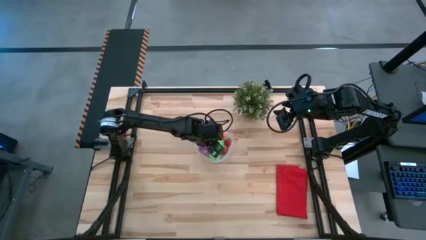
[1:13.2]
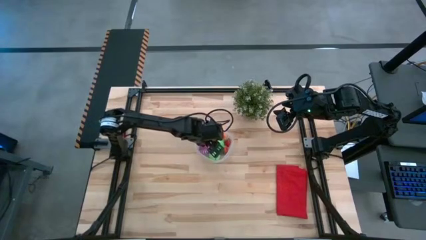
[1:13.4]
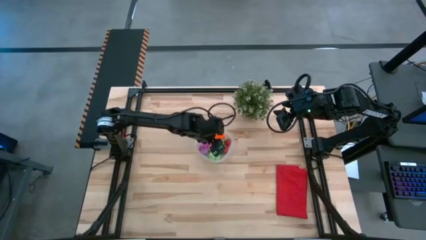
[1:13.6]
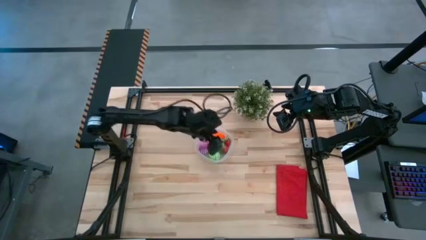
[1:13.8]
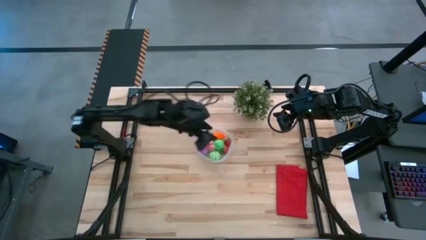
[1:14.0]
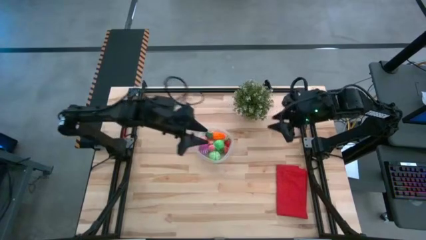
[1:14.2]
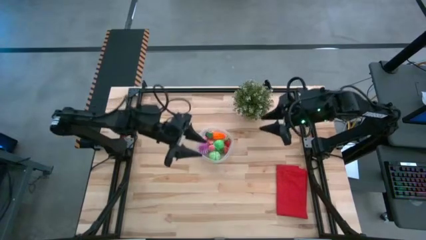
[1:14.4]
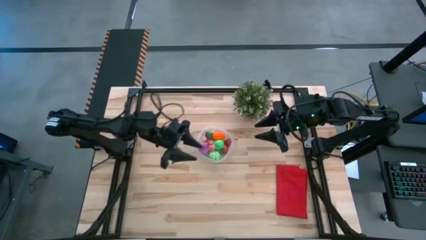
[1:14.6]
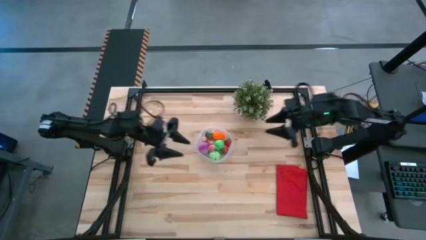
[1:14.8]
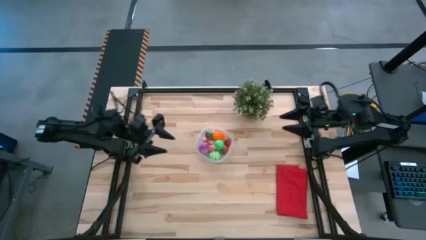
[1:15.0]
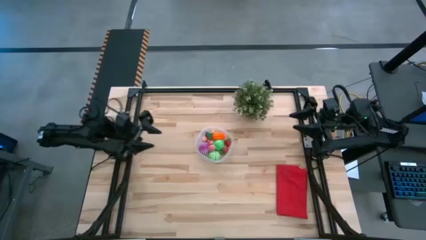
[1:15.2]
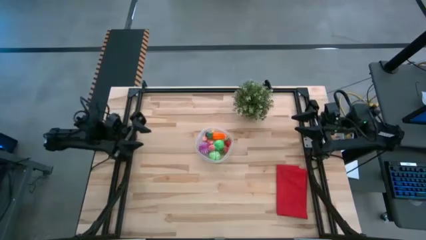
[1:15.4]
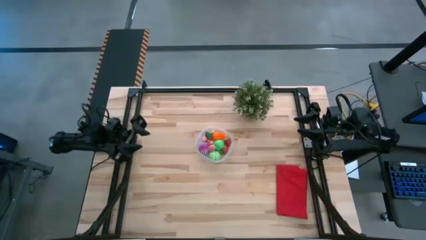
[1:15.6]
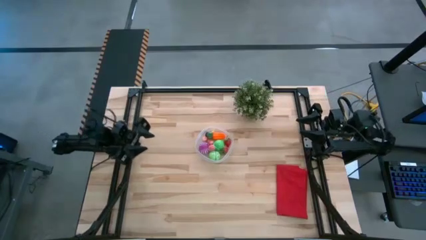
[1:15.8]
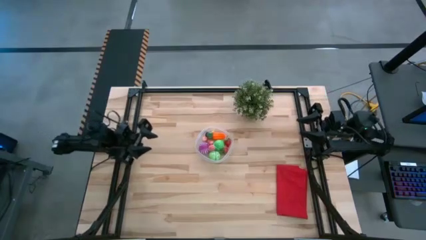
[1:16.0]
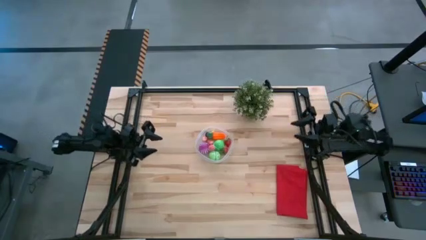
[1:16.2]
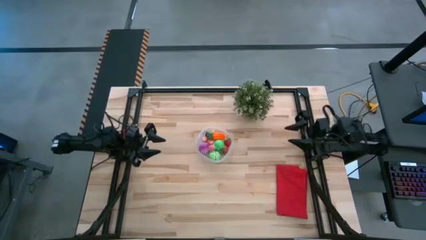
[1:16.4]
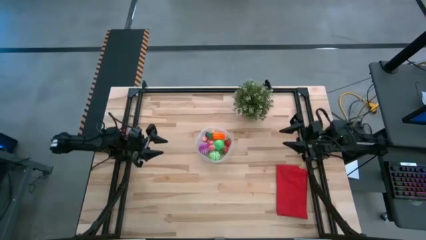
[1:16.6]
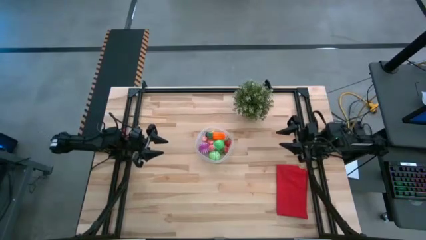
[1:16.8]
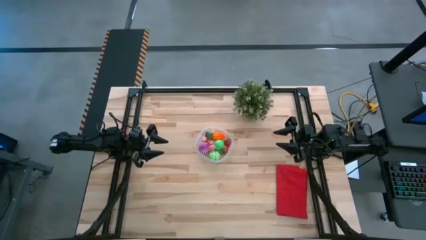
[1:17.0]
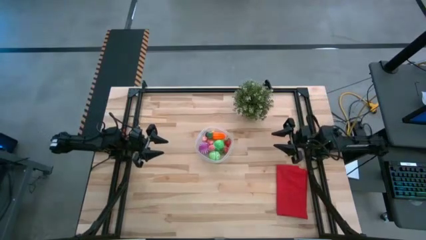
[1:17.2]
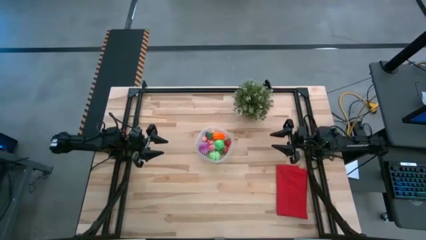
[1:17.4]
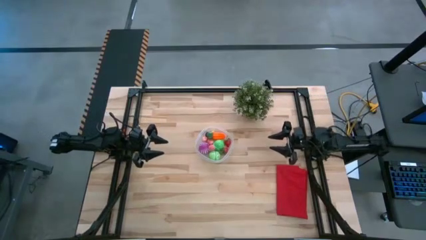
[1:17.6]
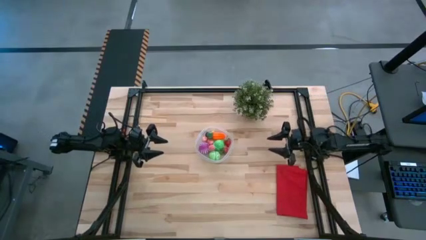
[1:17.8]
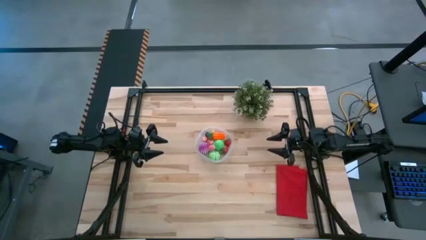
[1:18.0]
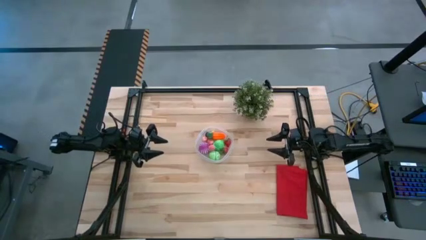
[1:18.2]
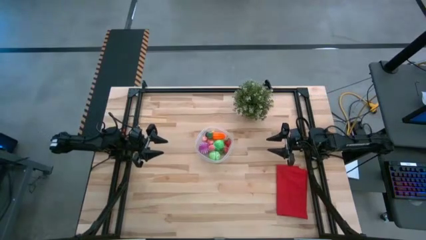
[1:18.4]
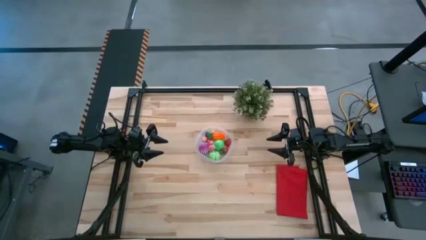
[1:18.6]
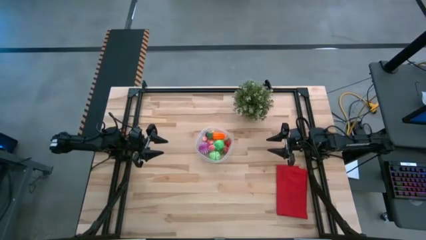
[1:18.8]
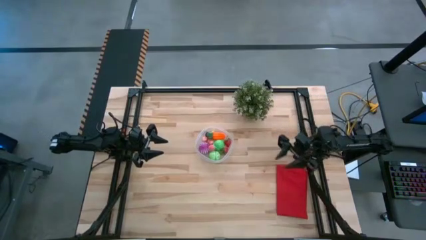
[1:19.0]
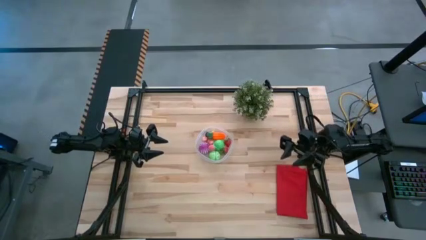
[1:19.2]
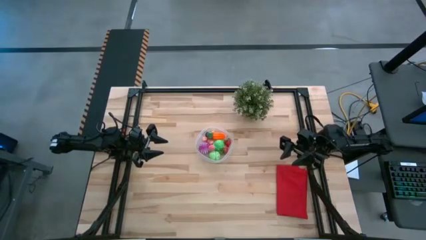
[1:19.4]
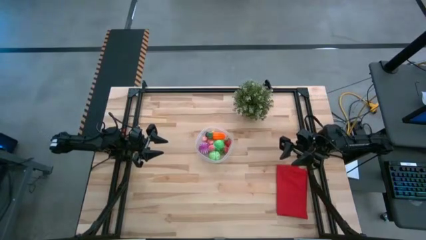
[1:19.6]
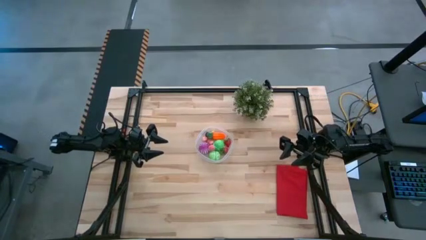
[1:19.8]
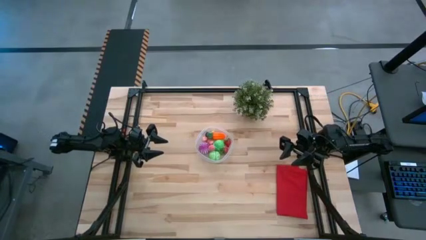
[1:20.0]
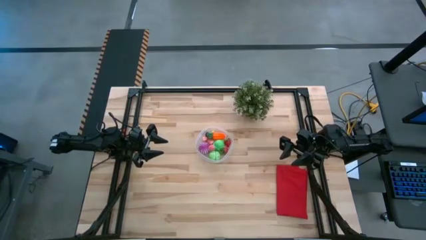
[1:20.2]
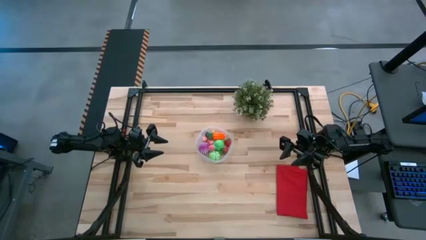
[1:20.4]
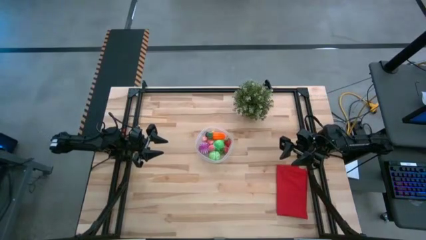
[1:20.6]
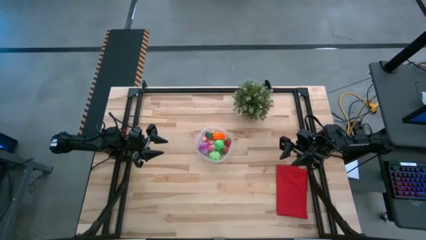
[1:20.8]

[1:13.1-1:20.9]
Task: Pick and placing Produce into tupperware
Return to Home Position

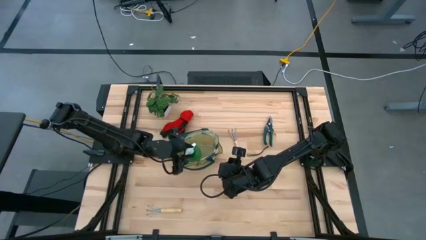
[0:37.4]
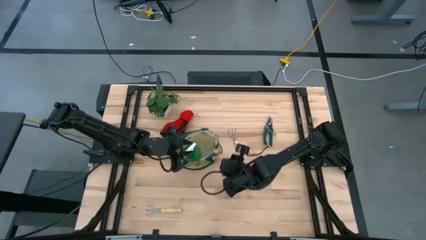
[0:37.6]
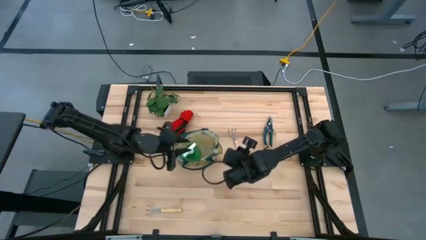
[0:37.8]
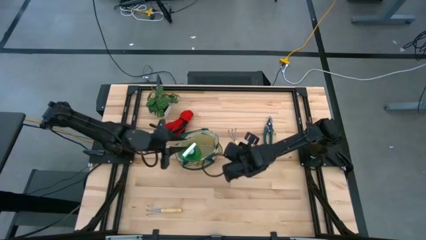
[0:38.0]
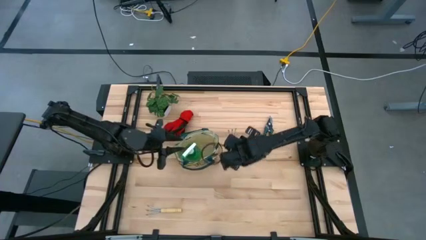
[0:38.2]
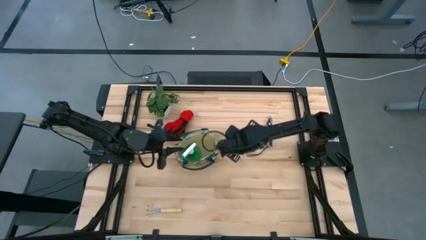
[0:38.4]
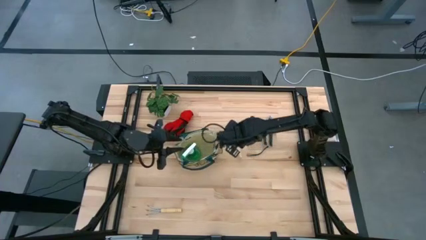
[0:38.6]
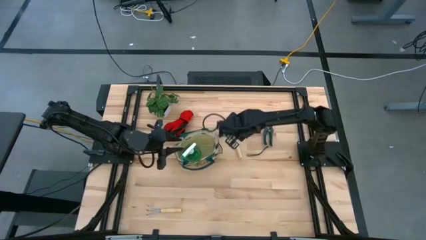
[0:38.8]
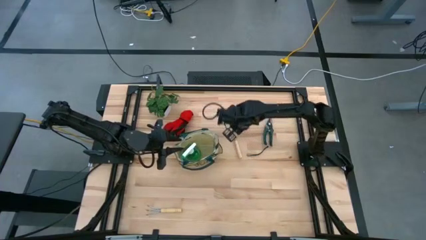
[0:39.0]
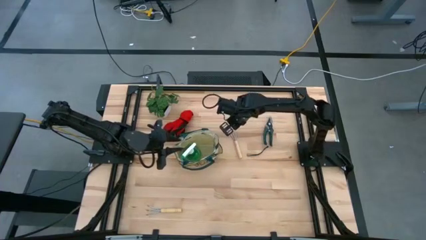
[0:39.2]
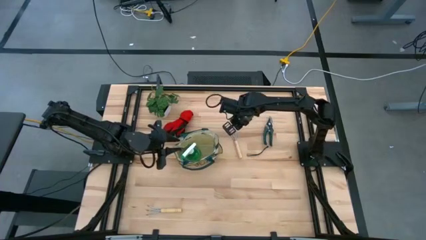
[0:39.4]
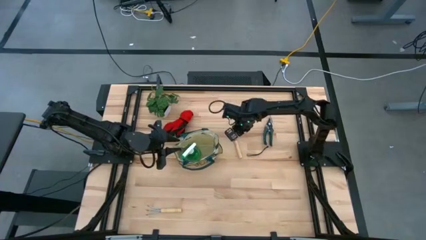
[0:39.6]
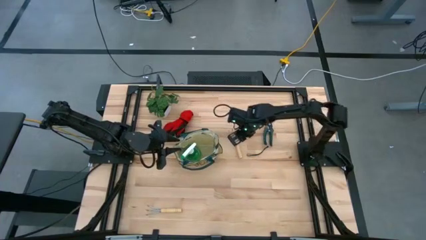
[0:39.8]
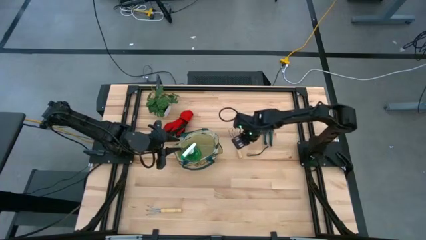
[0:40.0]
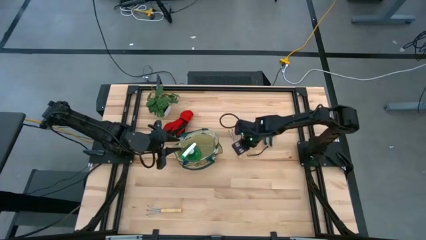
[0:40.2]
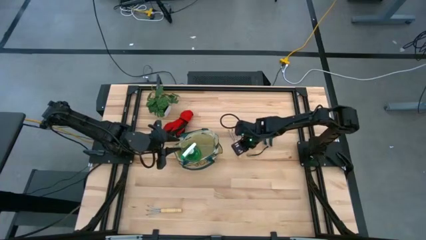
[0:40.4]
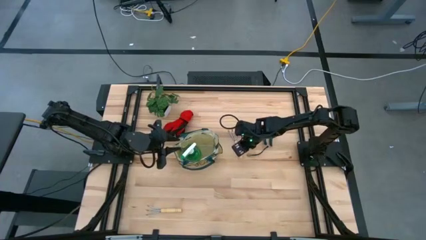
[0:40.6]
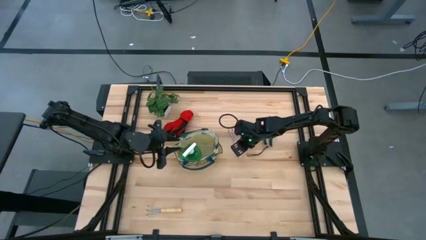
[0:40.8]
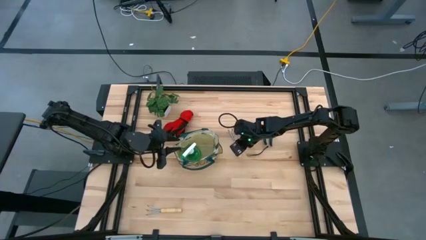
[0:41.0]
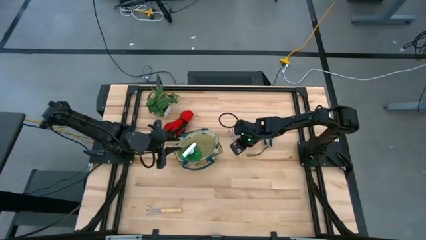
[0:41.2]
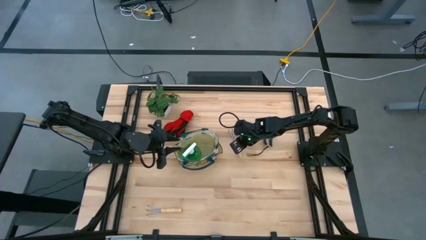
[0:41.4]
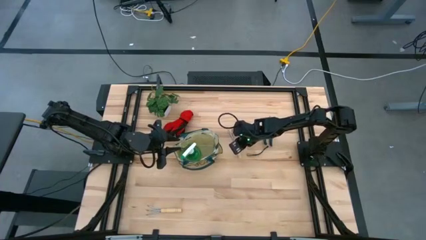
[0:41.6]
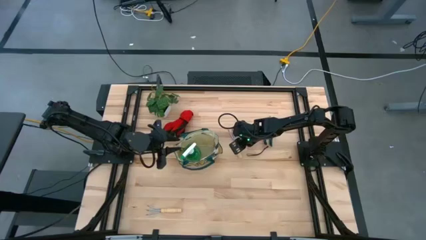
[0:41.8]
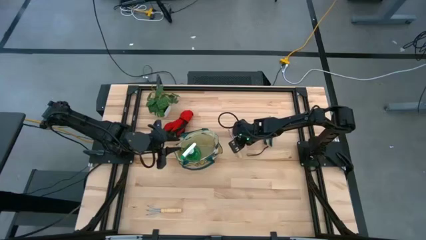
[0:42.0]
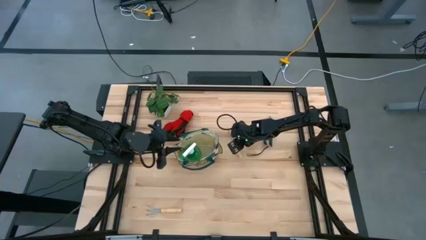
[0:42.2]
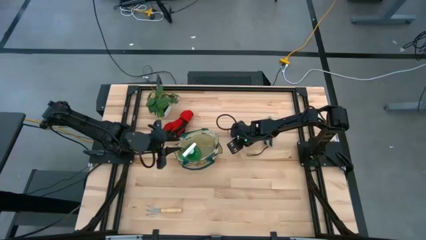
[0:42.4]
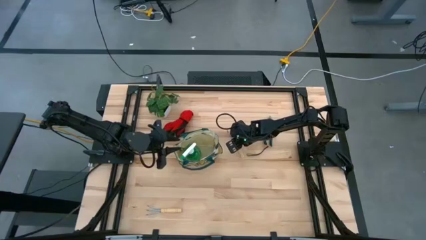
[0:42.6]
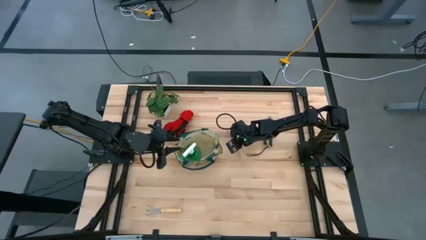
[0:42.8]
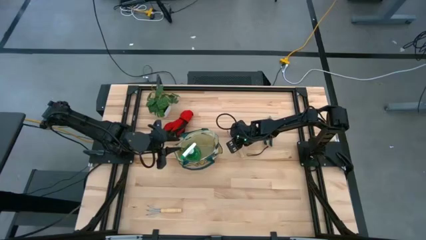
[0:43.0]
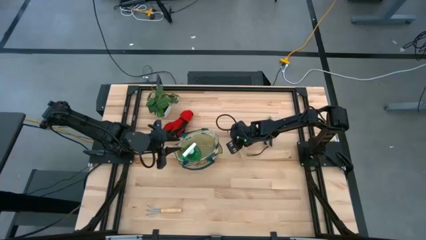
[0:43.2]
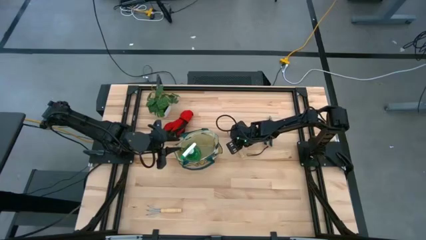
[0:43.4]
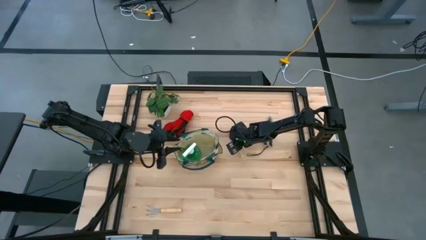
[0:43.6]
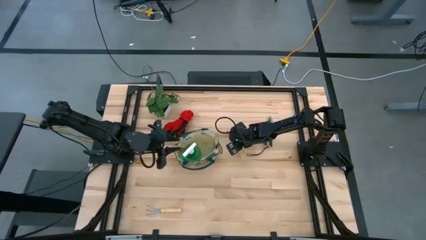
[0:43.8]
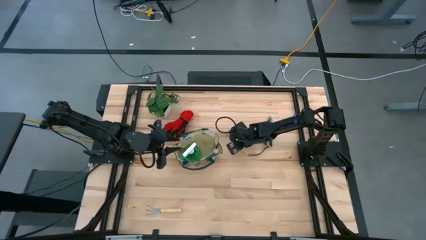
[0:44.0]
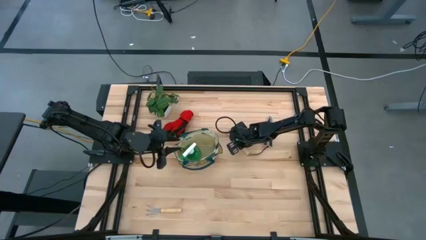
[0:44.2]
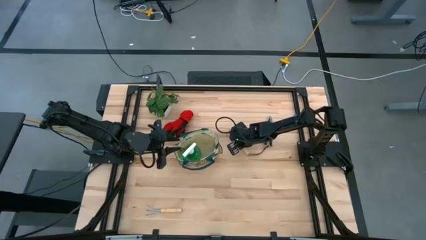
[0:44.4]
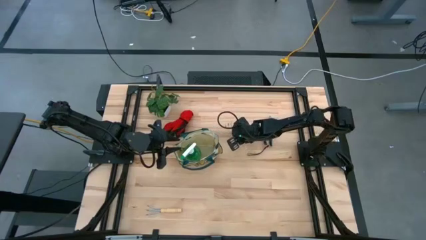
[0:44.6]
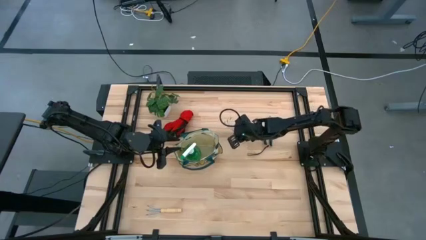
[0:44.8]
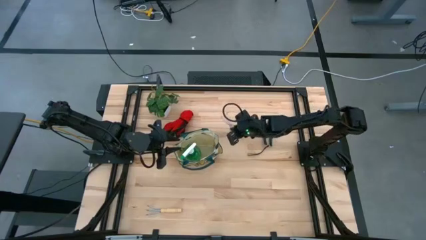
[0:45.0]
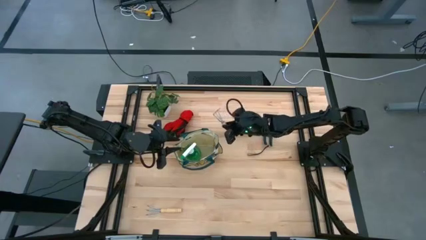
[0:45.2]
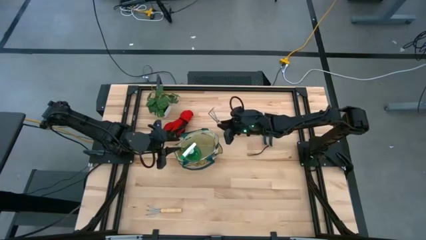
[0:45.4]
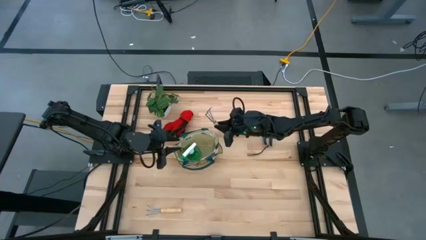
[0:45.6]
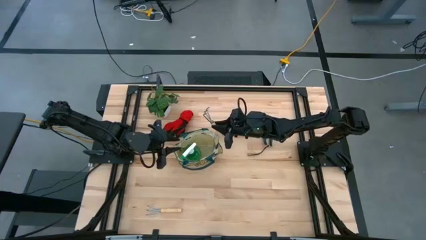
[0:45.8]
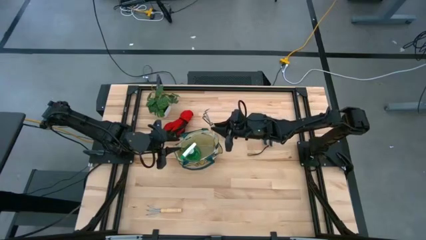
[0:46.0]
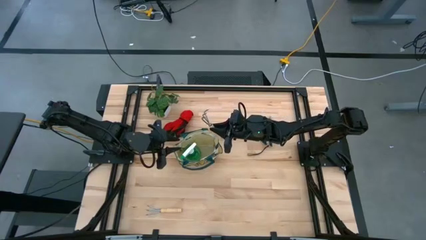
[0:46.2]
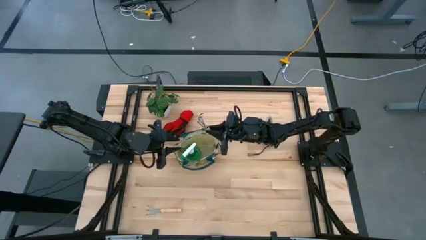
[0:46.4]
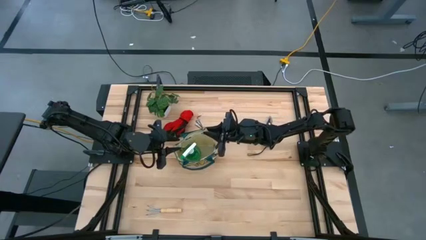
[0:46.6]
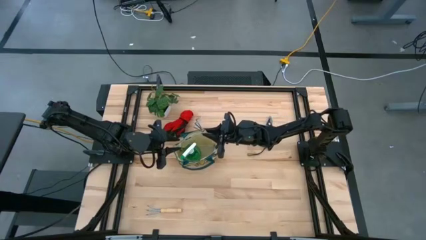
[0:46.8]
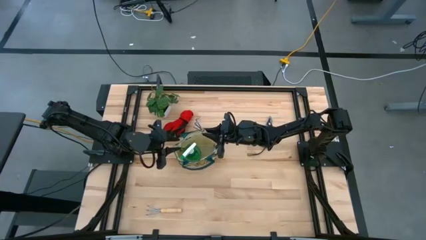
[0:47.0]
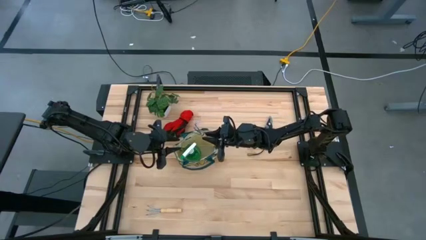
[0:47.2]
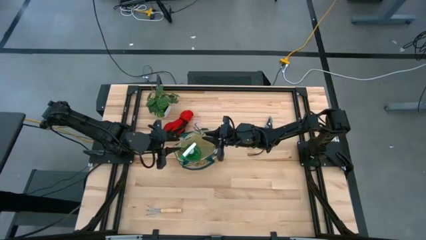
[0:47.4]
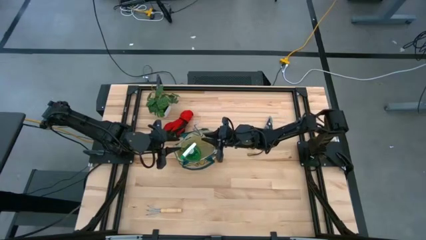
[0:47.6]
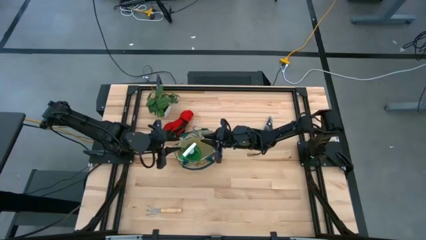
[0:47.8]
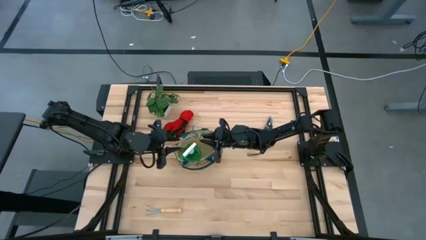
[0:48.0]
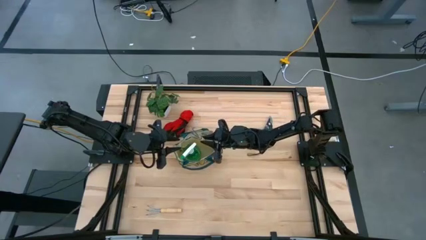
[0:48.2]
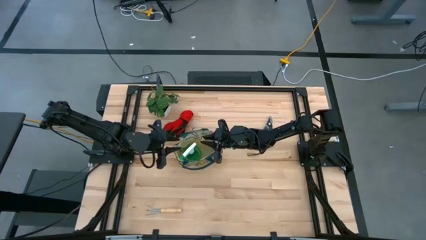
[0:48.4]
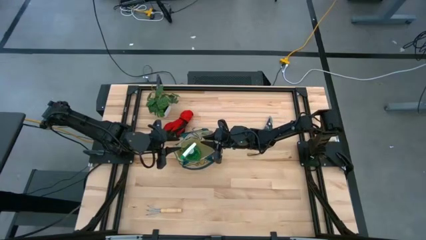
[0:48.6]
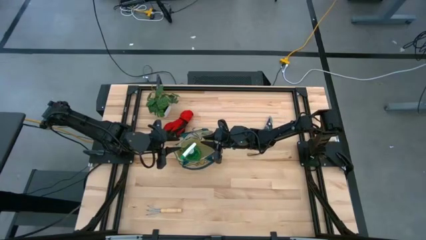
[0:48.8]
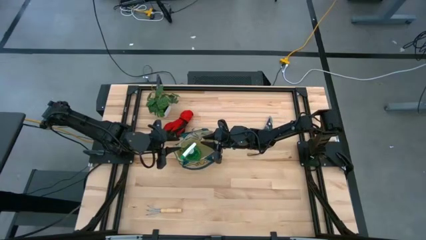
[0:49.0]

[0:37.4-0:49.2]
Task: Pick & Place Garden tools in Gardening bag
Put the right hand rake into the gardening bag
